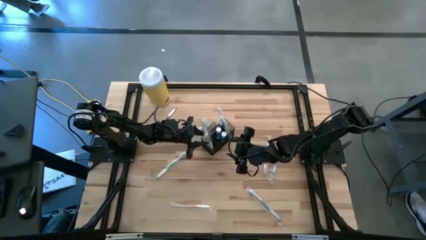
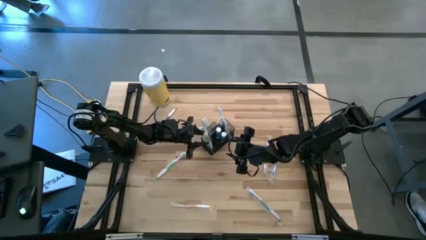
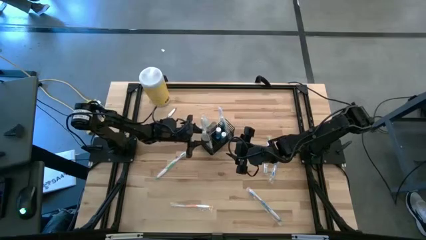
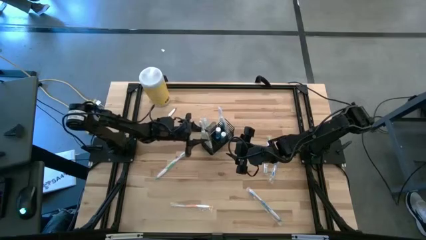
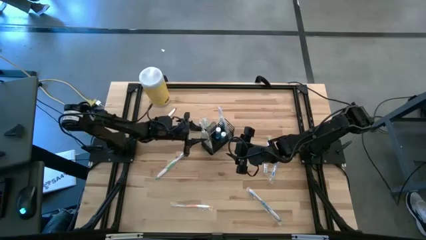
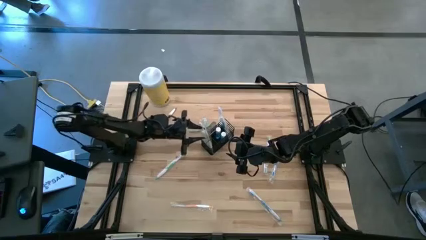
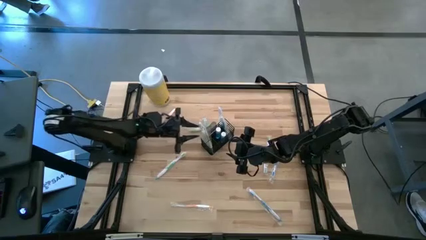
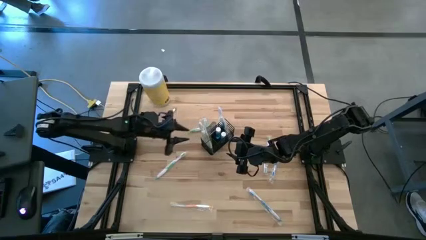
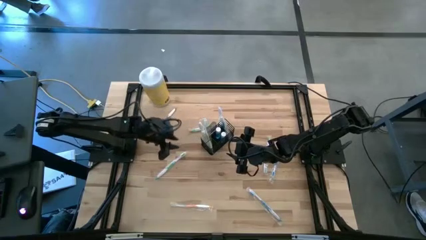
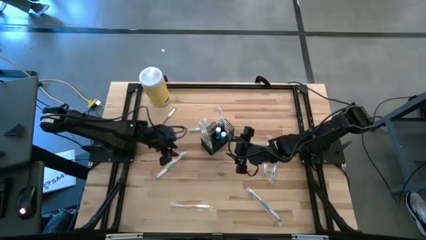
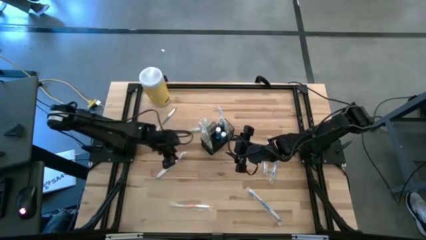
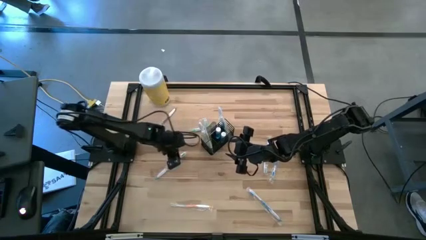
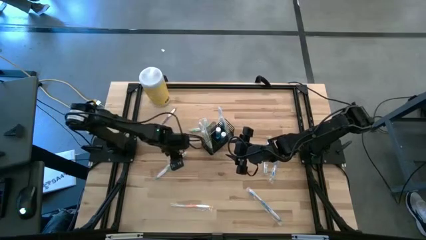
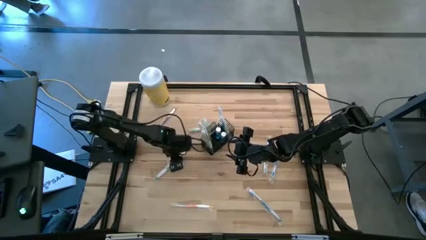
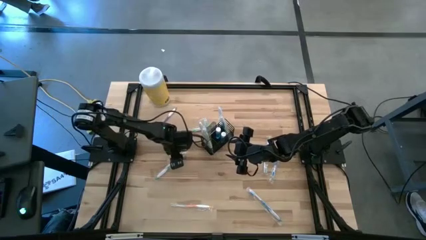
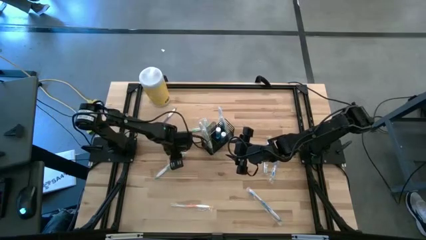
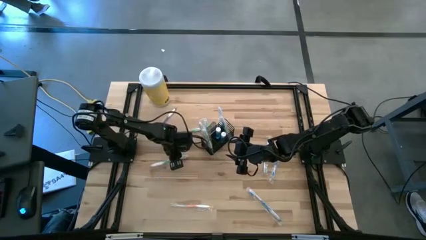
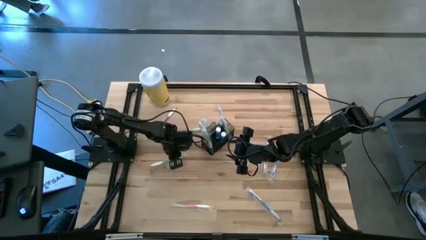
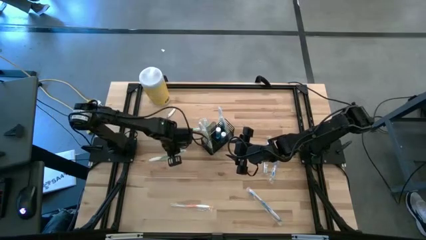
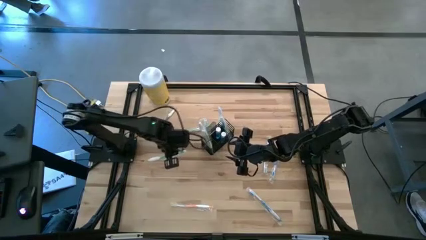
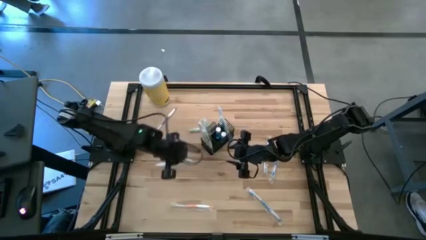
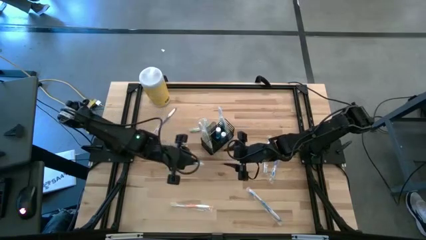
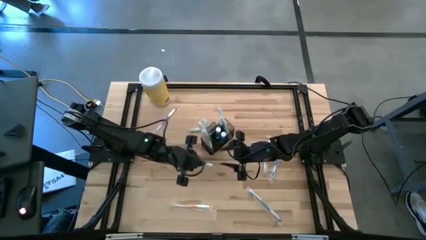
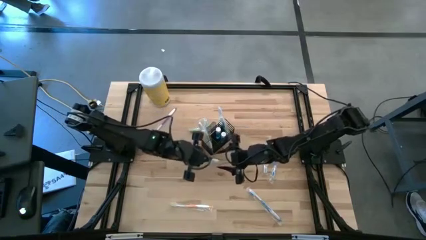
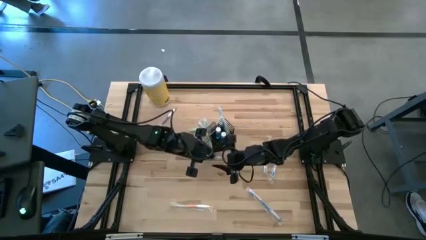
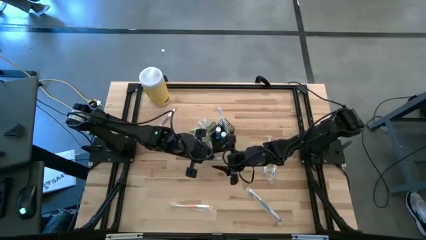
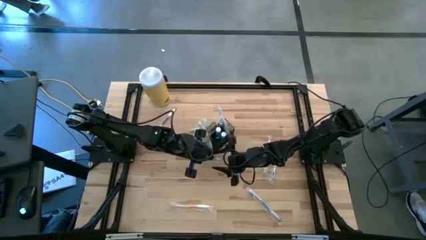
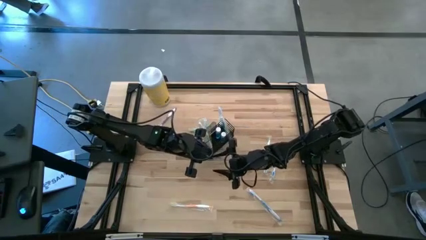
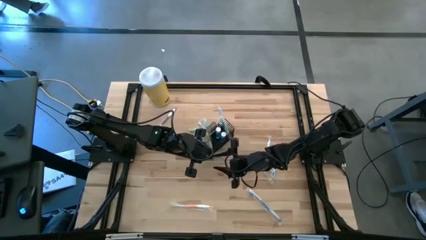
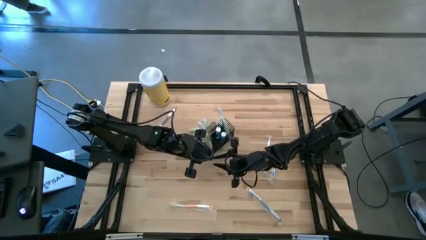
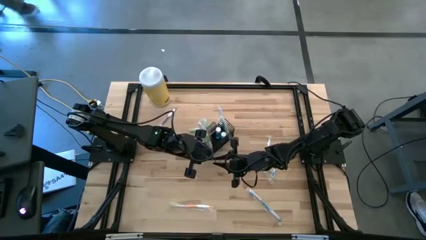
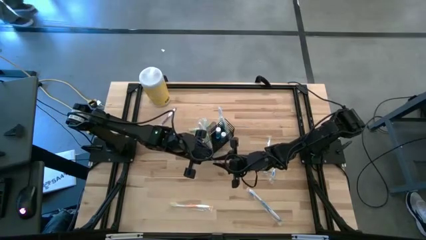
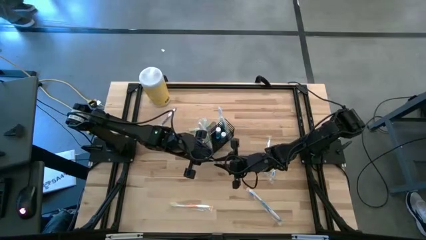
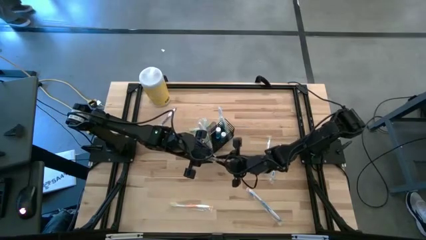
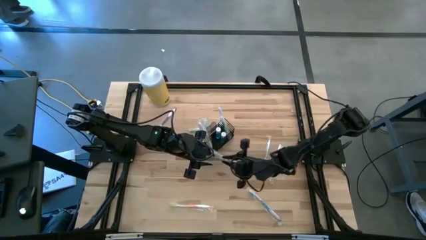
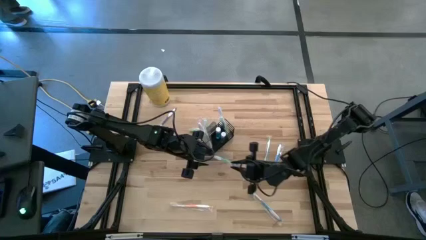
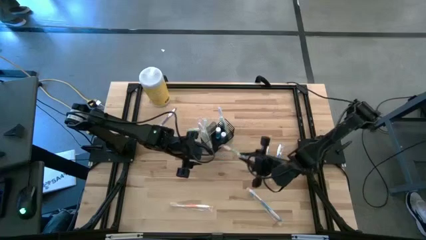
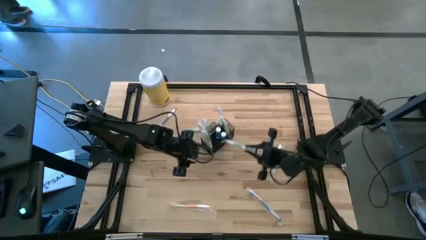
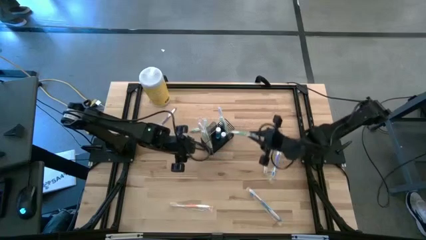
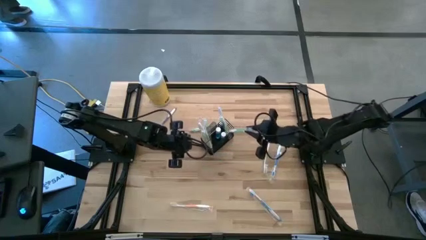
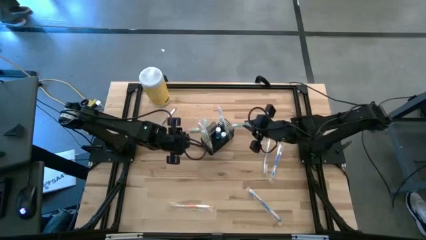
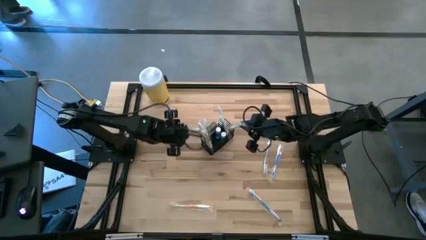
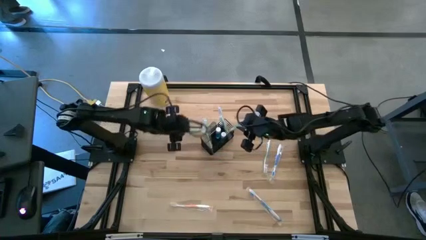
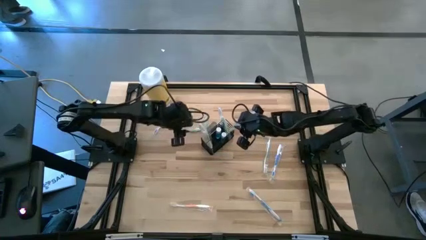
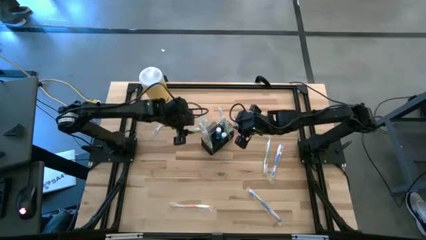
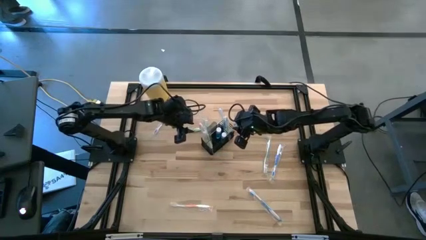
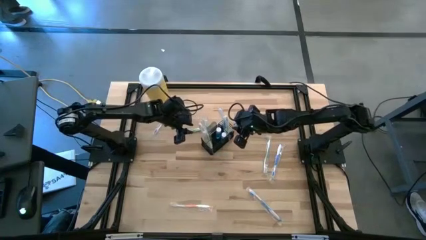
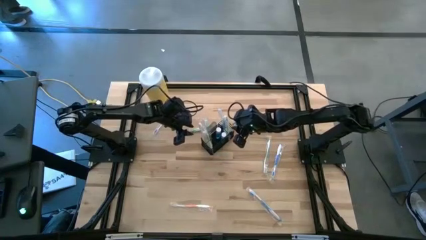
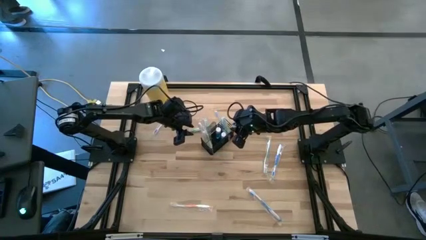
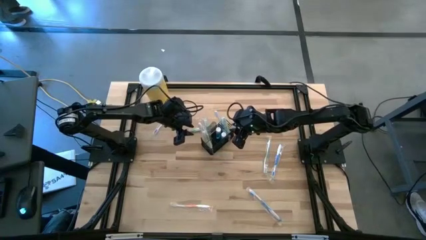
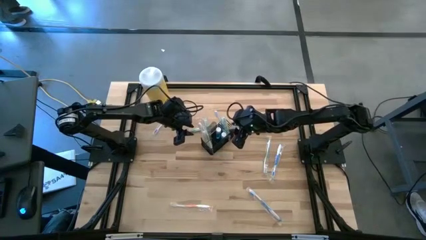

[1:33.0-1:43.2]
Task: Pick & Place toothbrushing station
Put the green toothbrush into the wire organizer

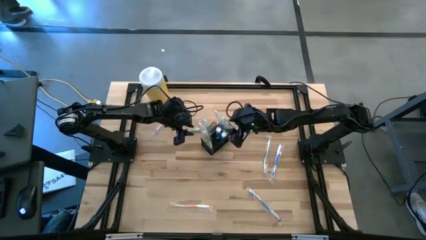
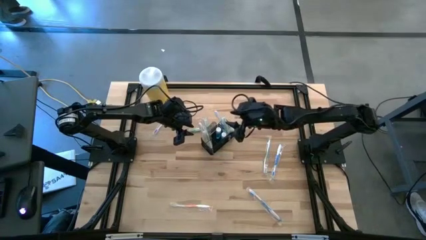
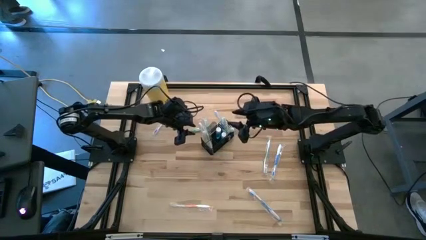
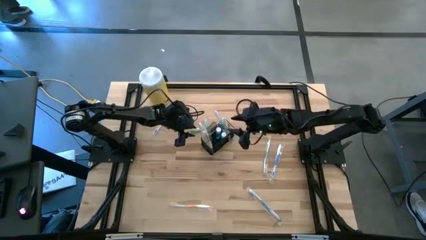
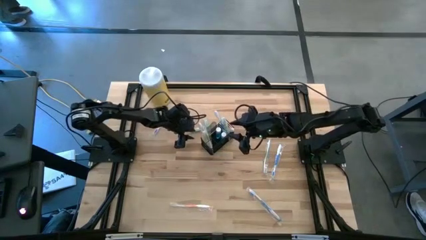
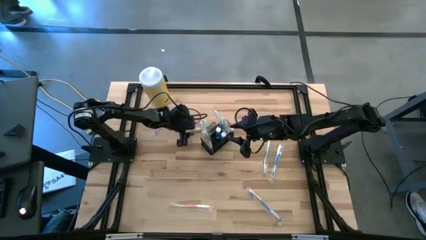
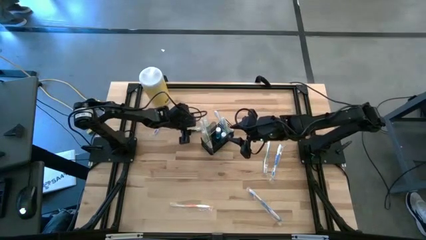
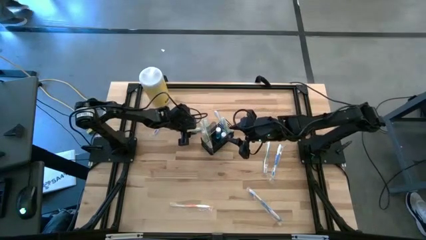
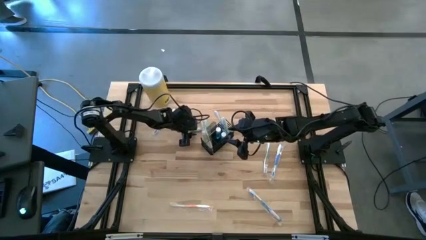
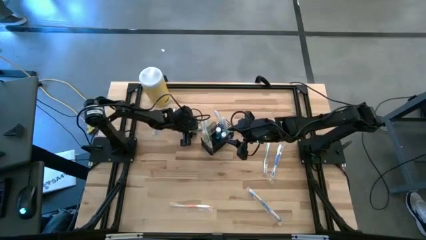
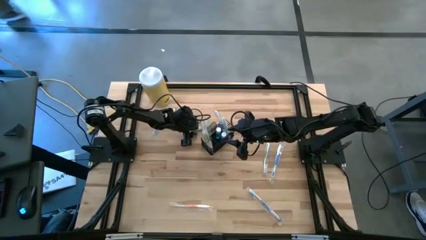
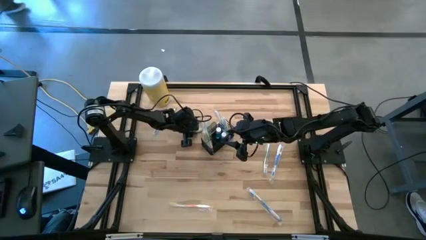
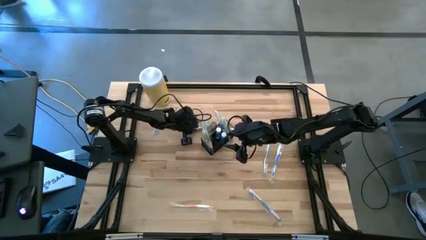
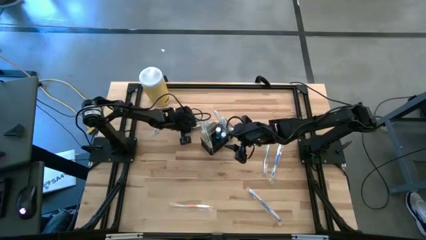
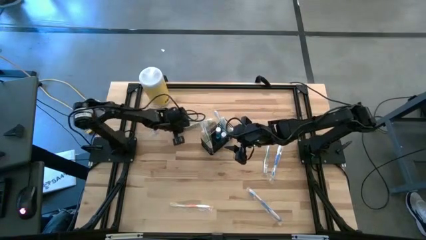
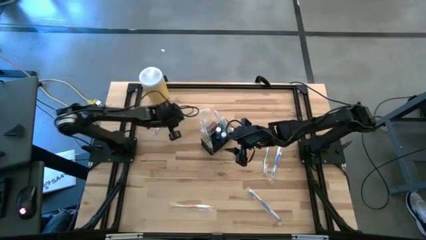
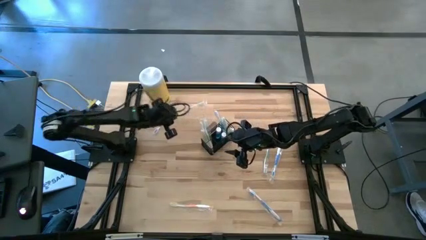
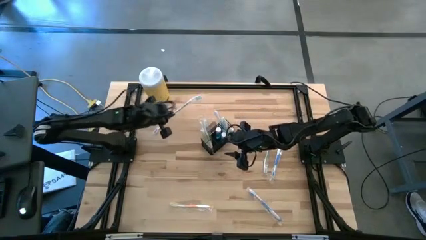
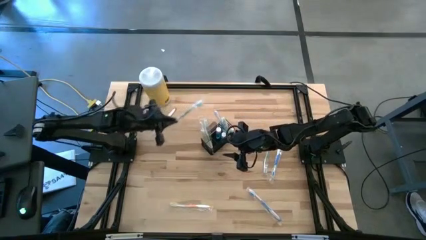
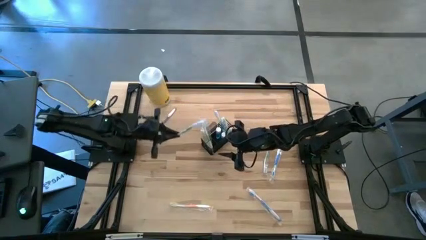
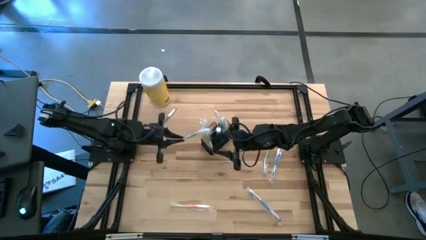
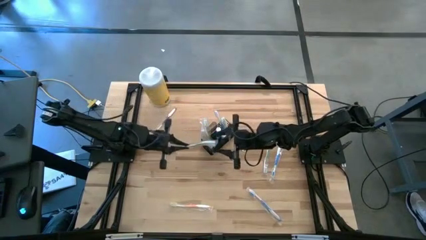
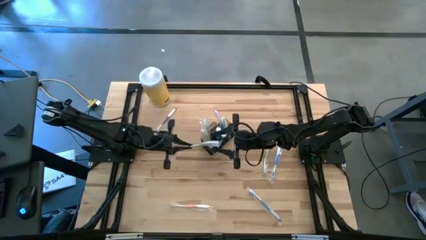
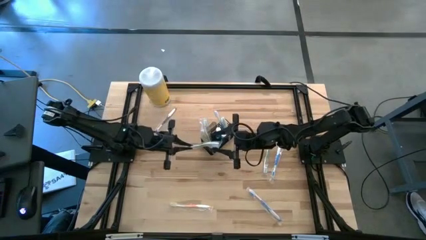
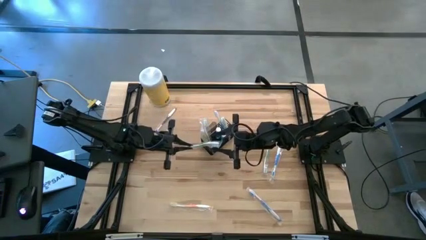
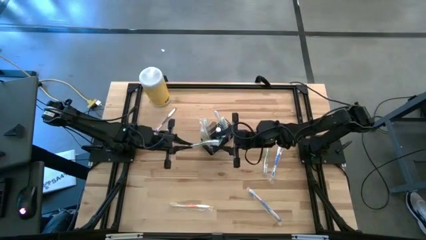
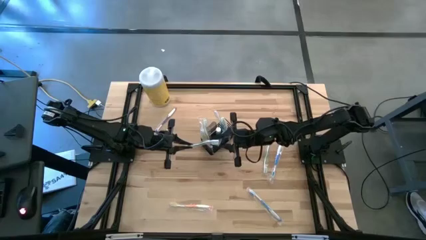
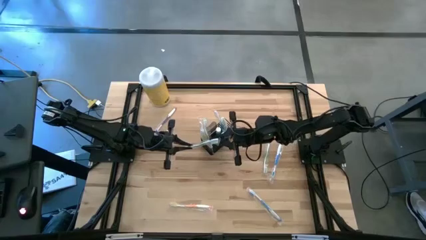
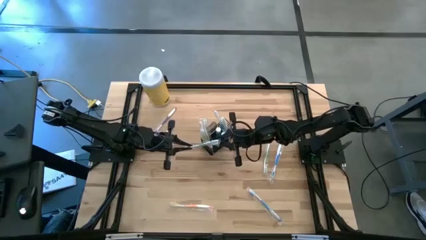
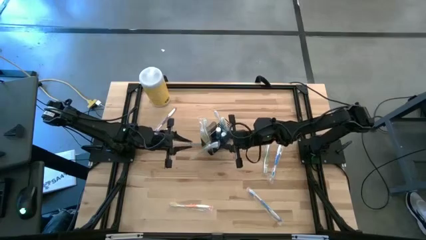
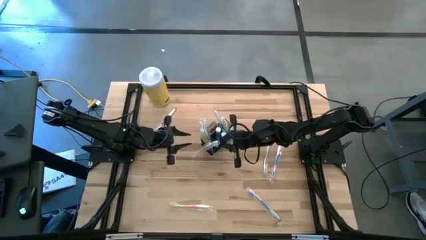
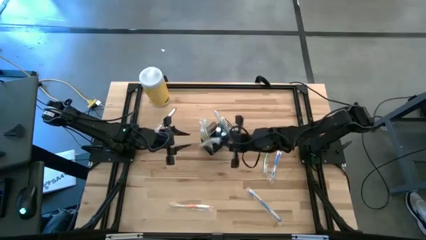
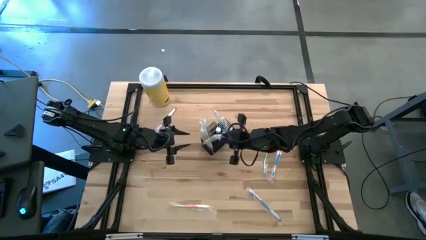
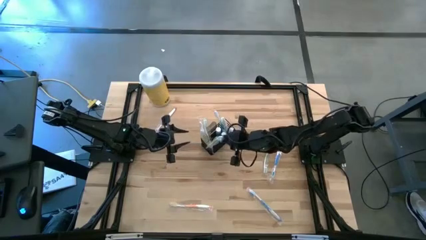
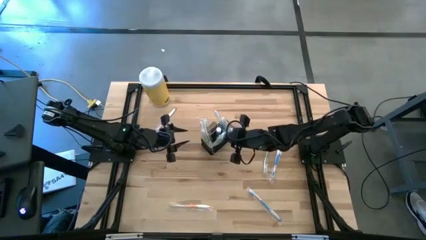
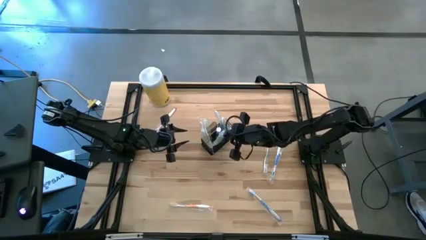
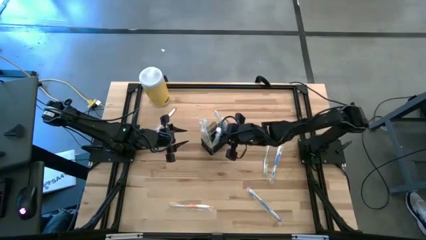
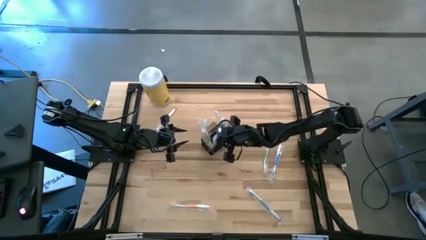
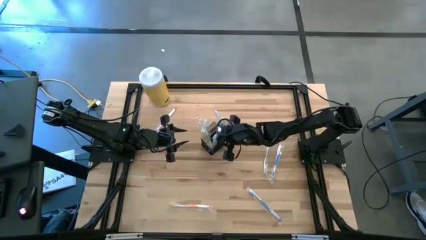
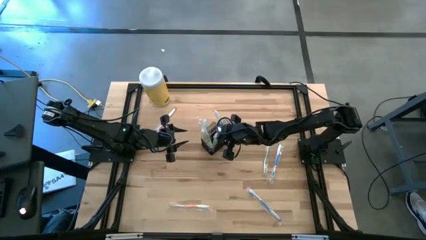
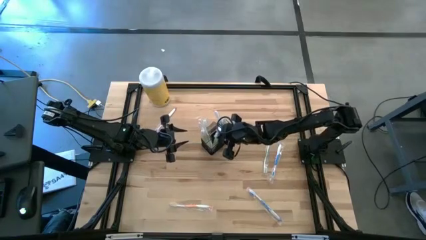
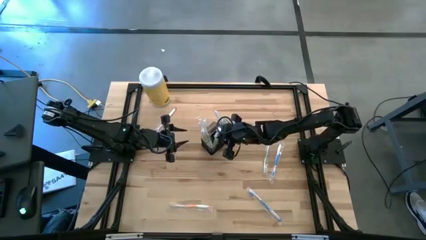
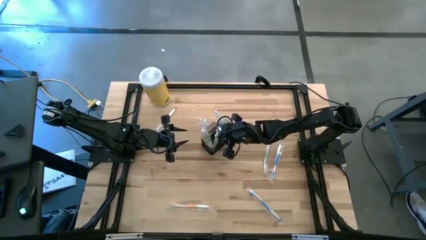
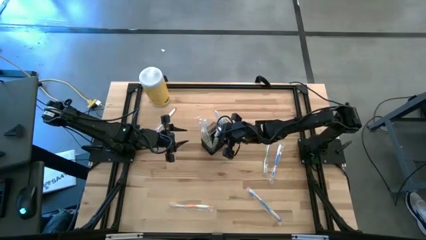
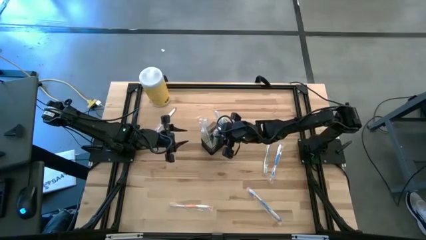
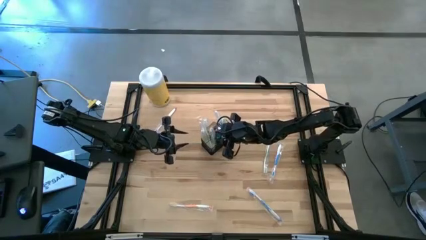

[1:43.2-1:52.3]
Put the green toothbrush into the wire organizer
